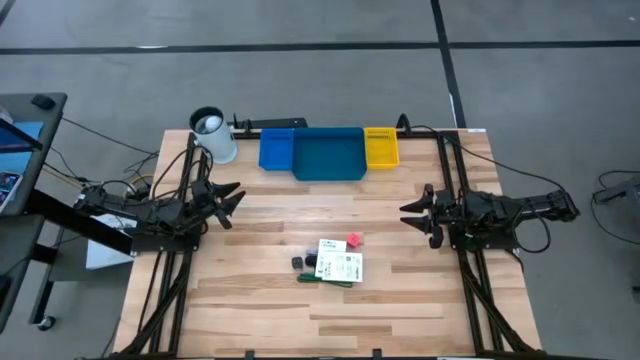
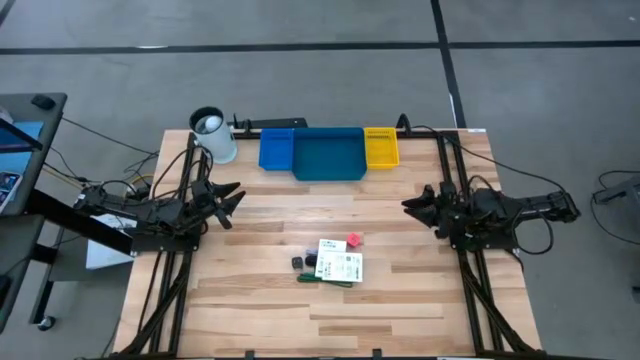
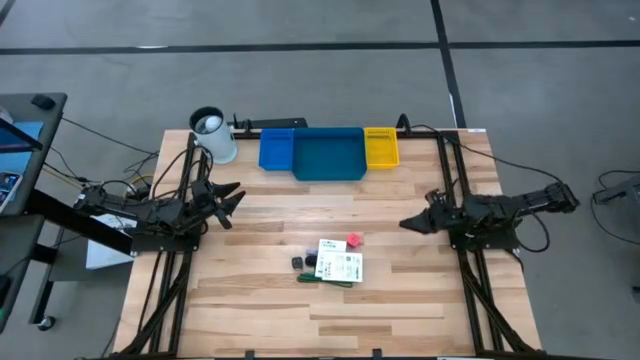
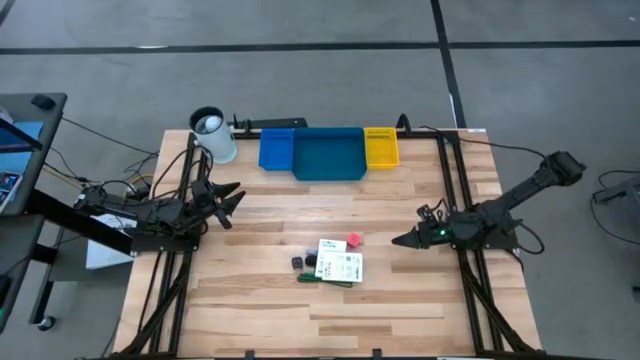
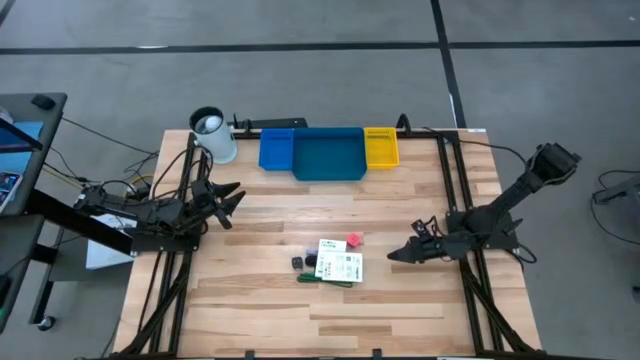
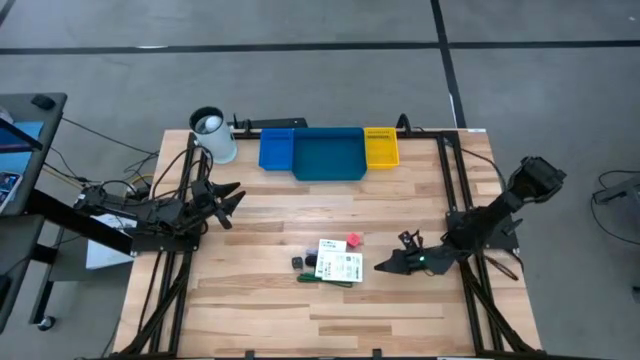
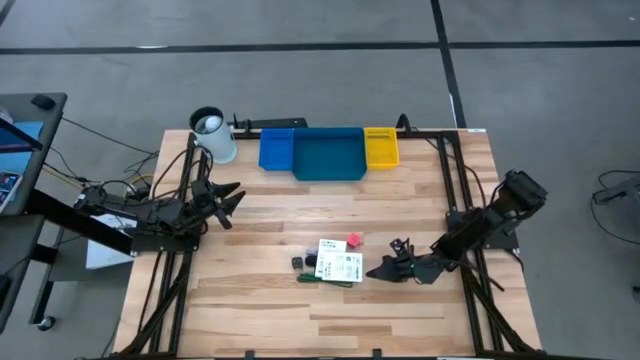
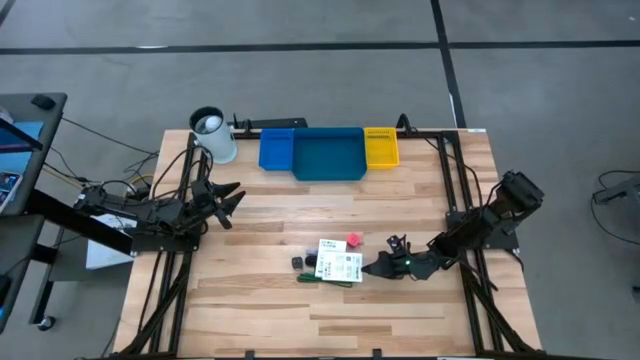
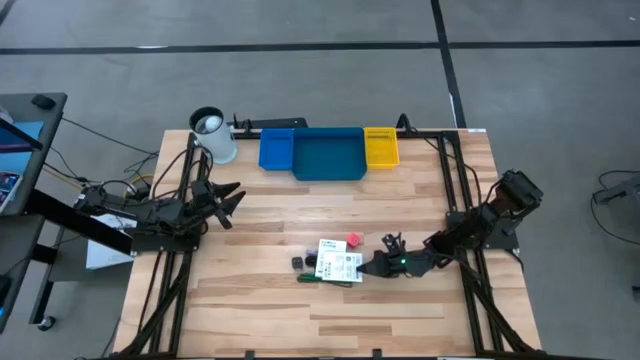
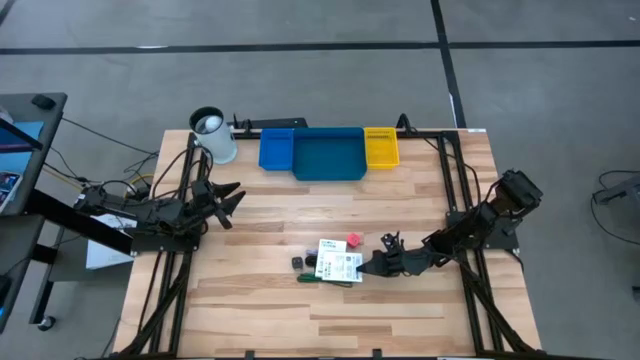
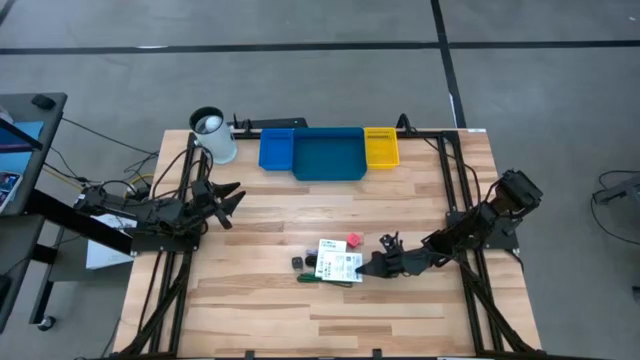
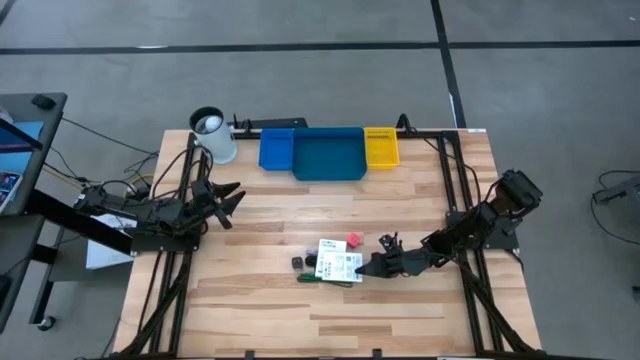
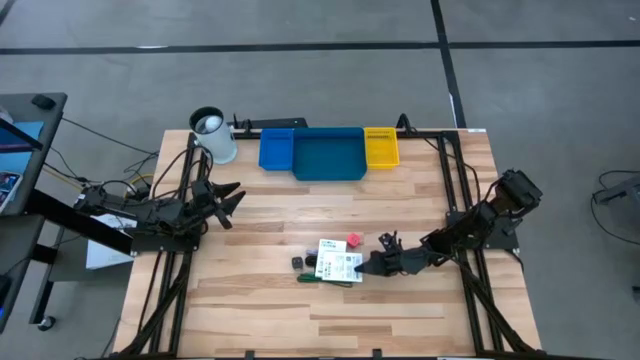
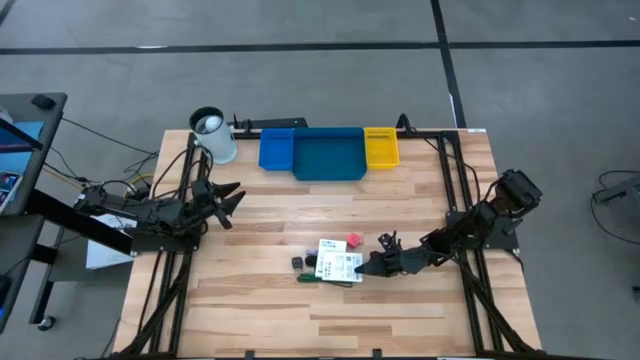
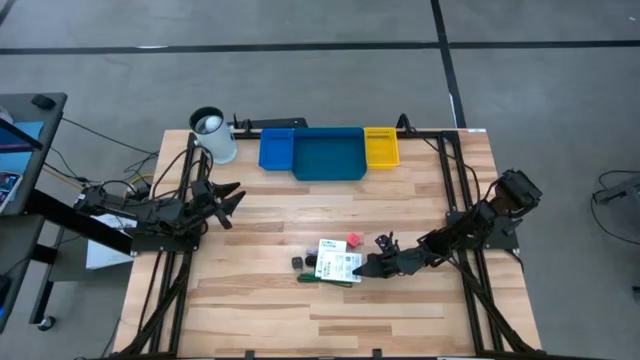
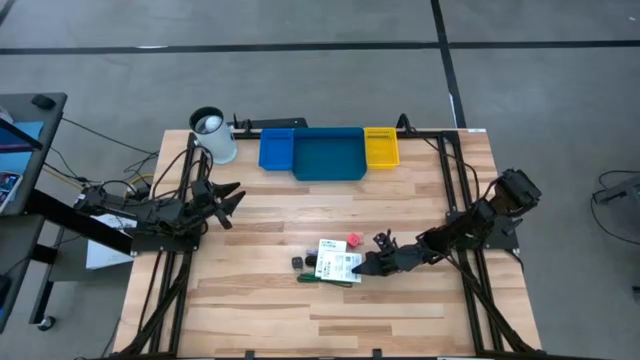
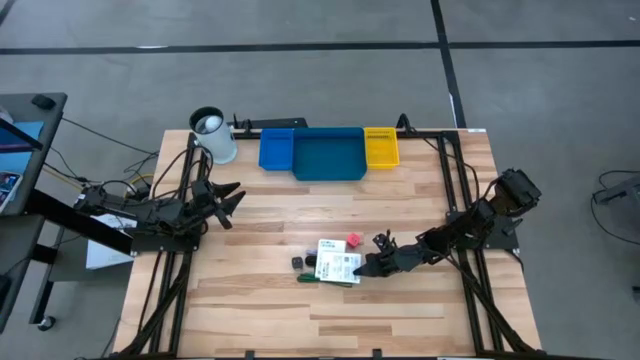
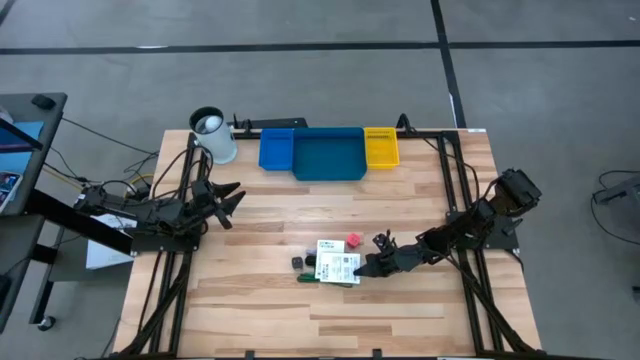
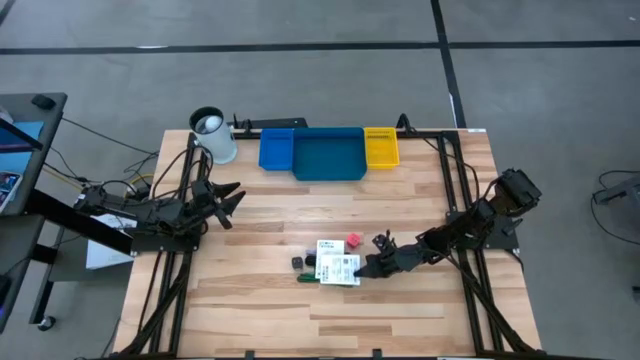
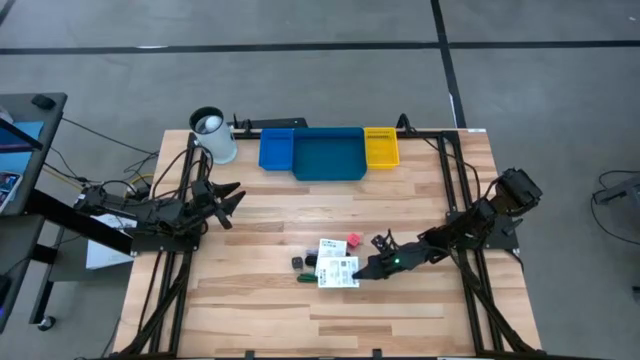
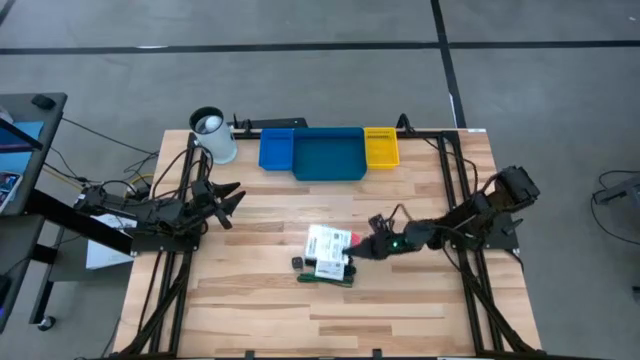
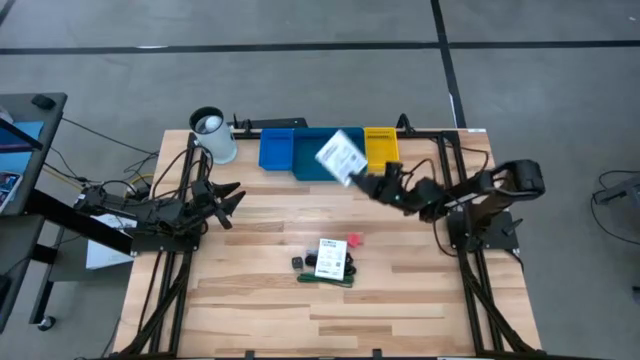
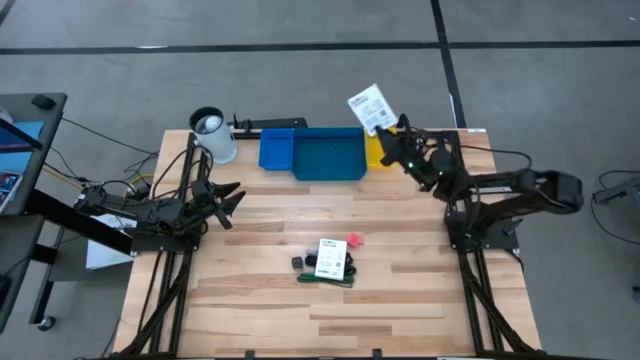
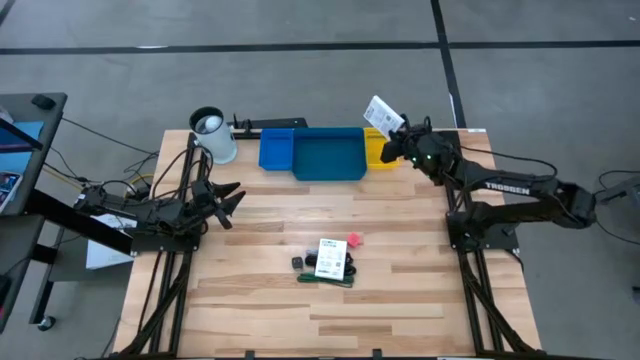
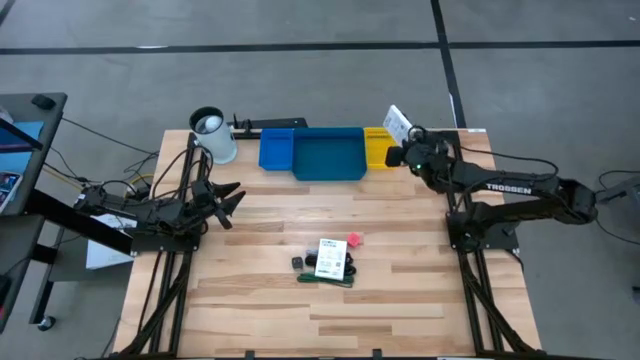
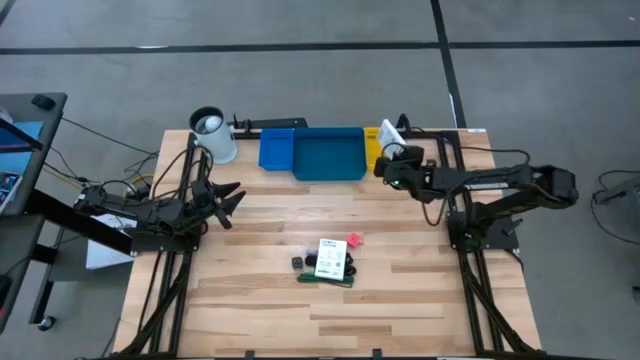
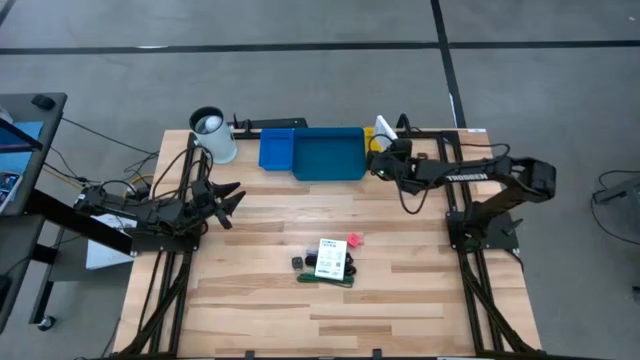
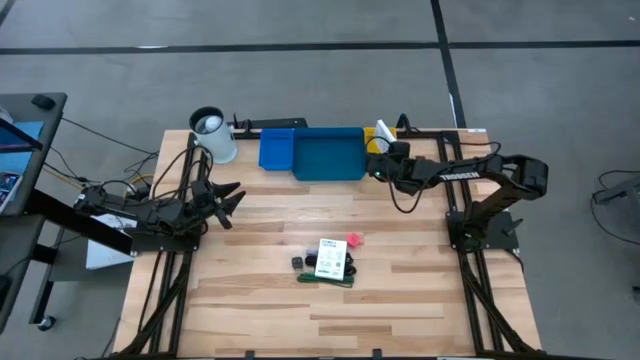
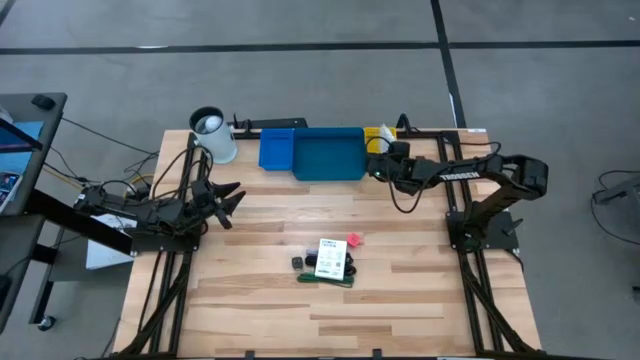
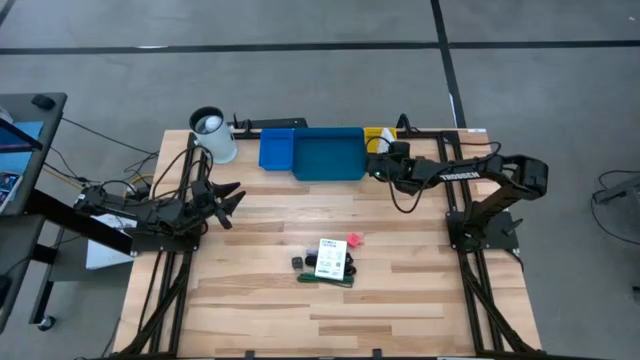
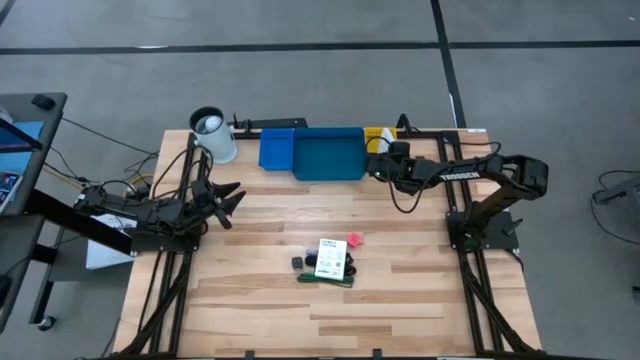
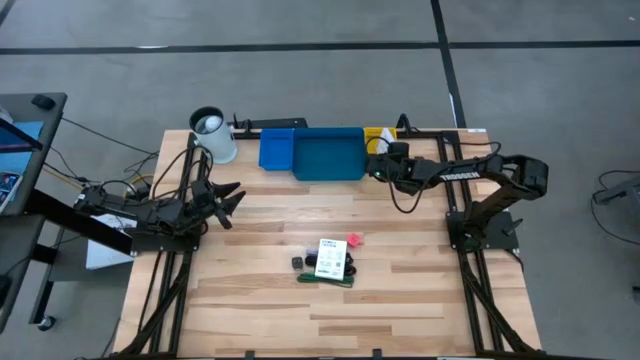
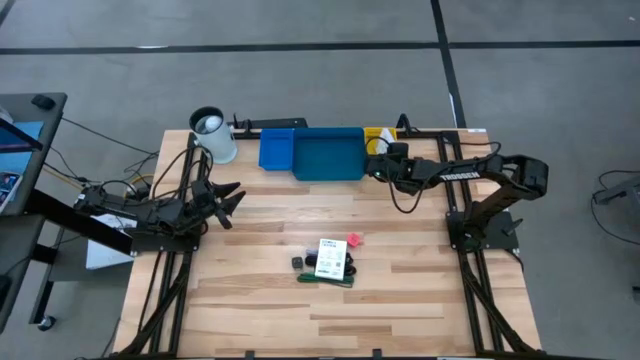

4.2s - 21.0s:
Task: Pick and place items into bin
Put the right white card reader box into the yellow bin

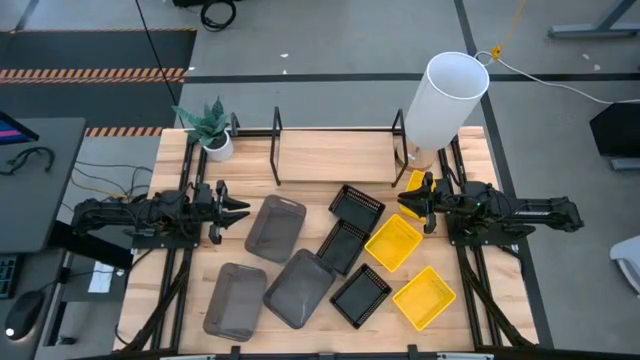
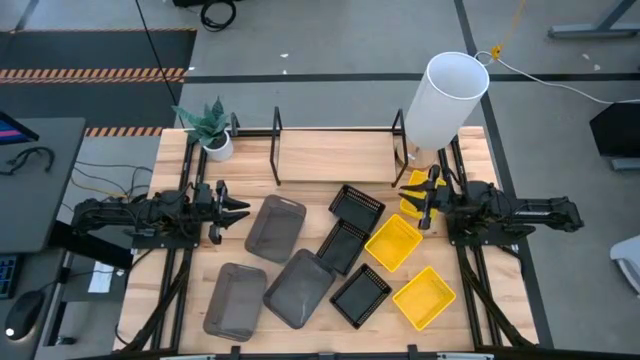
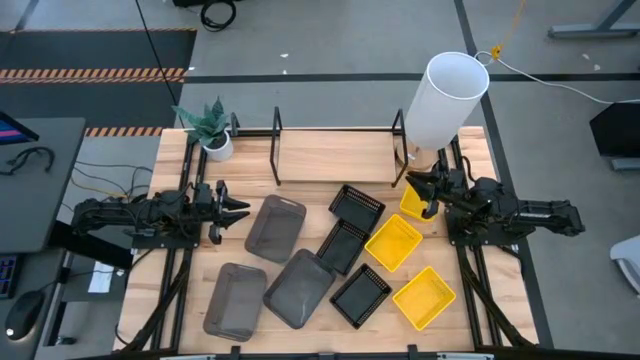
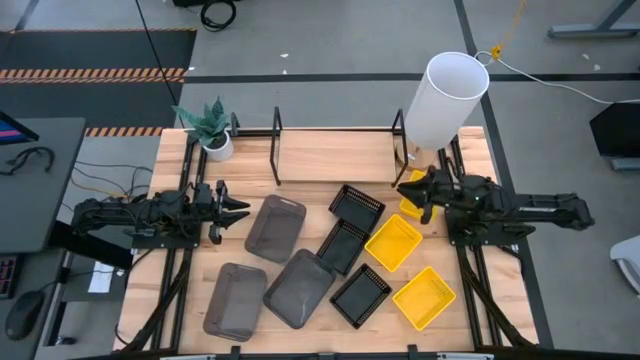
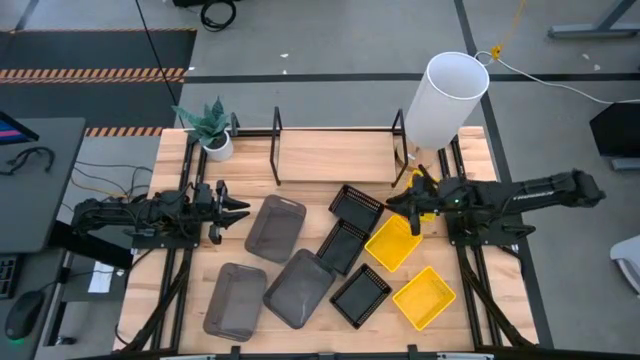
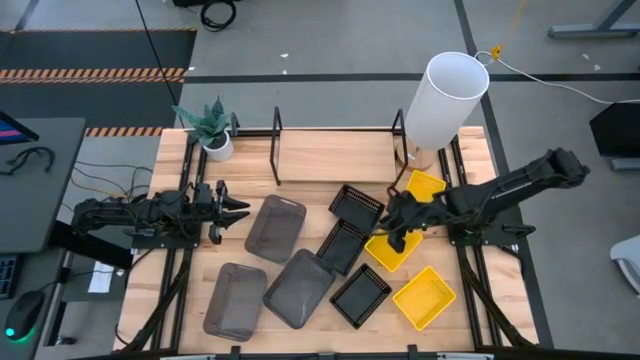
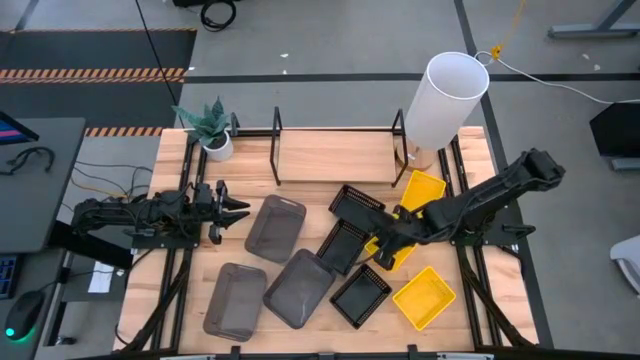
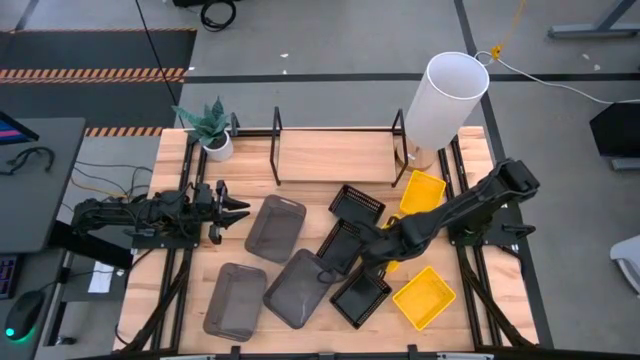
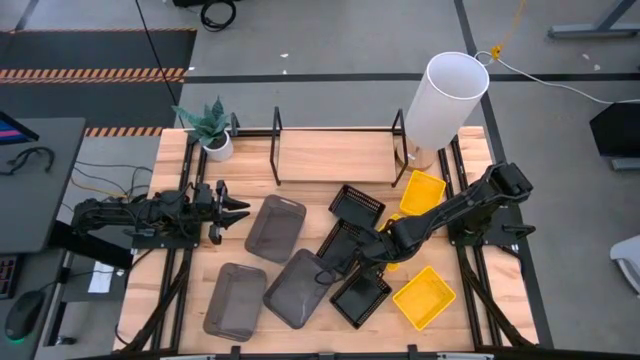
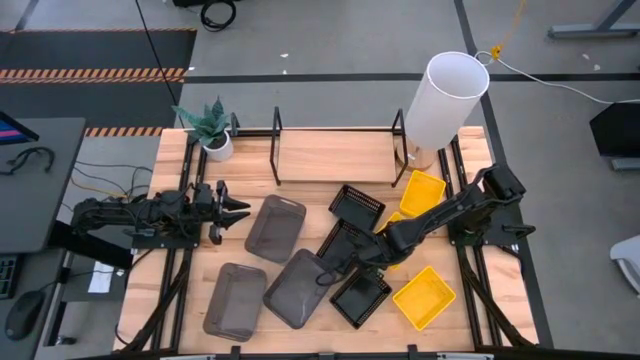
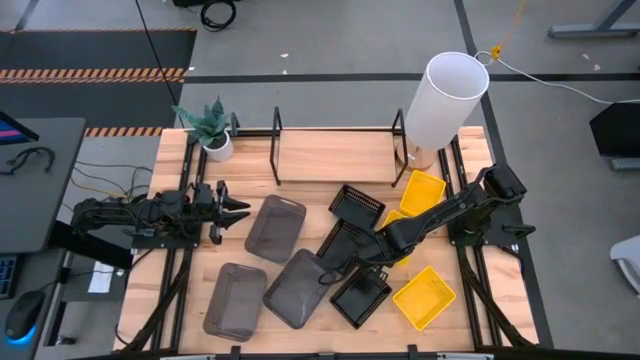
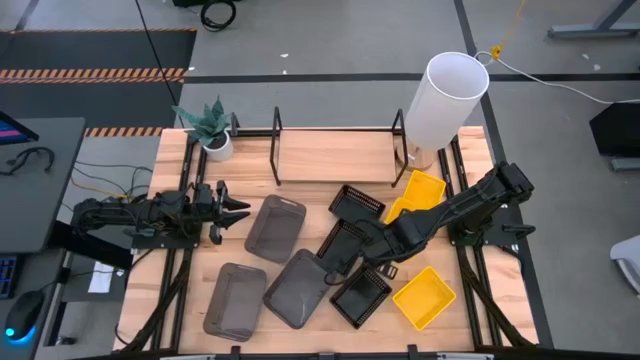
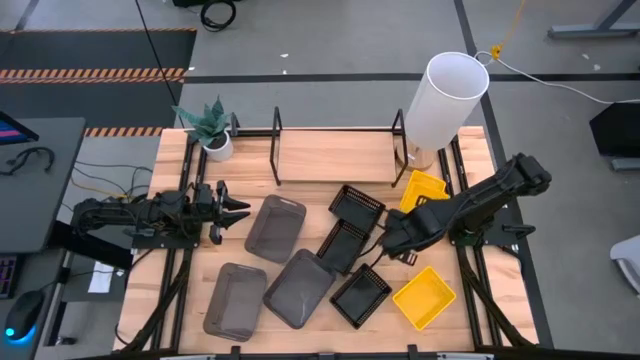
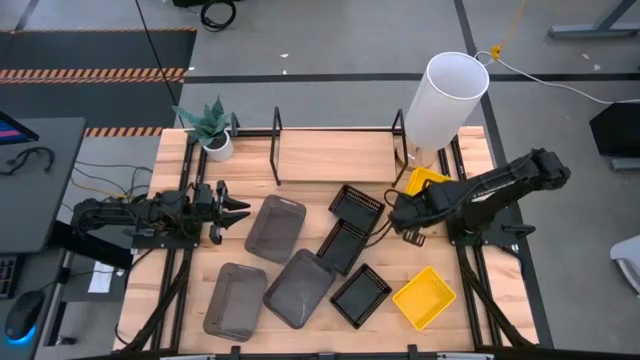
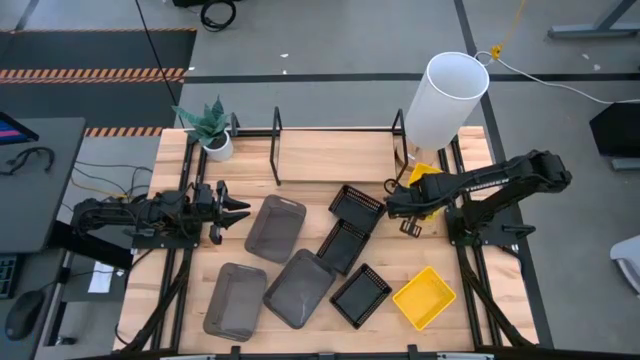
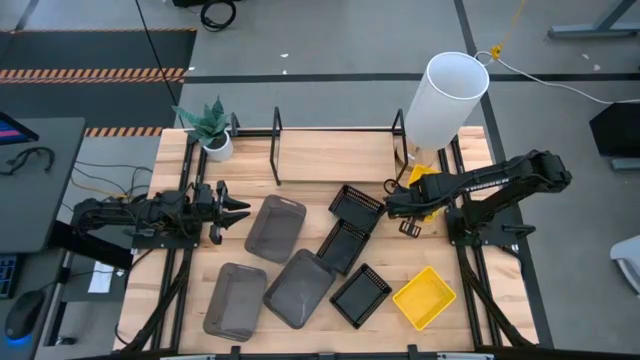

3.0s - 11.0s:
Task: Stack baskets on shelf by color
Stack the middle yellow bin on top of the top yellow bin
